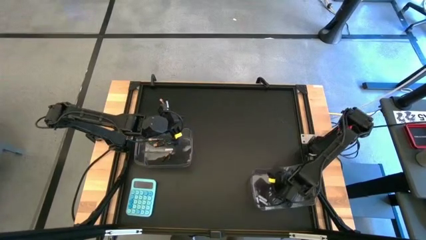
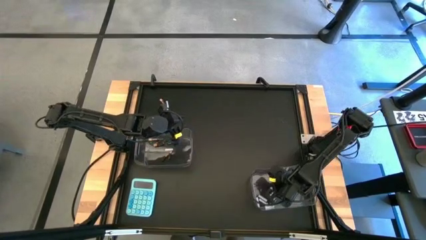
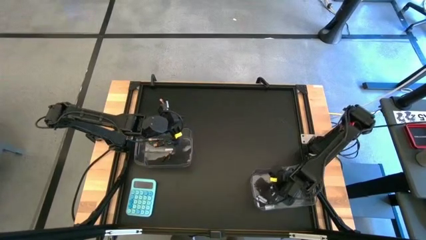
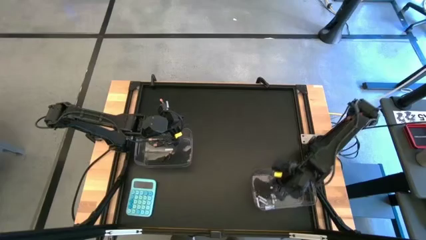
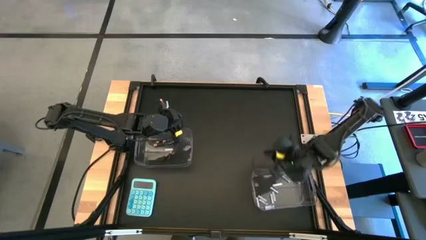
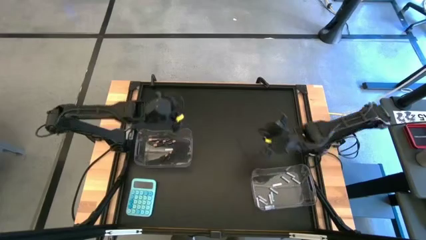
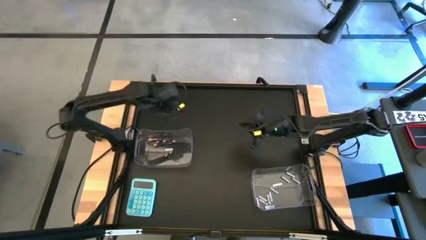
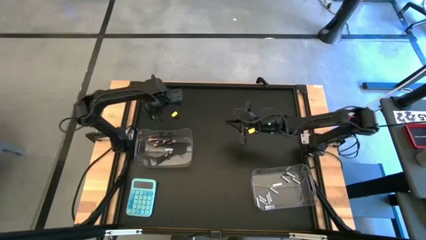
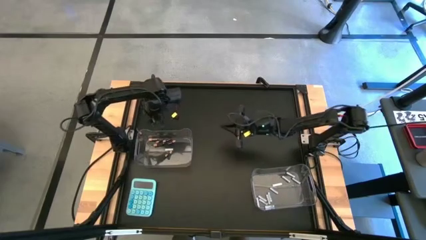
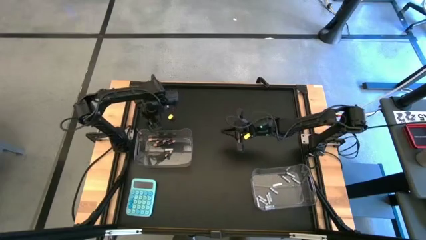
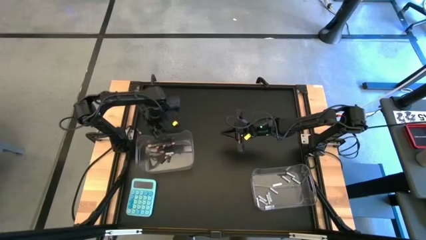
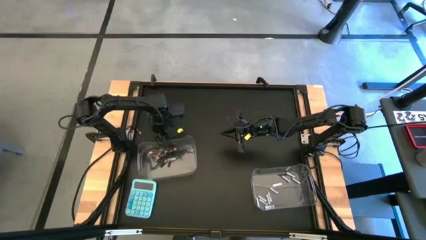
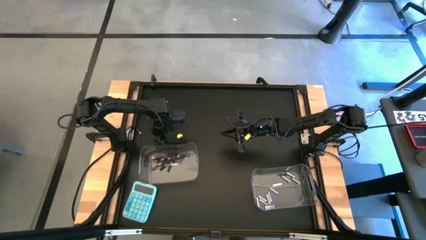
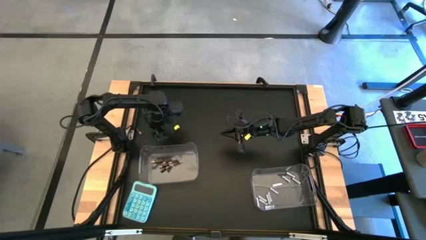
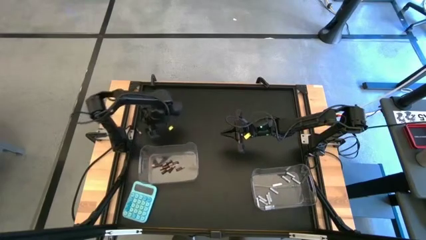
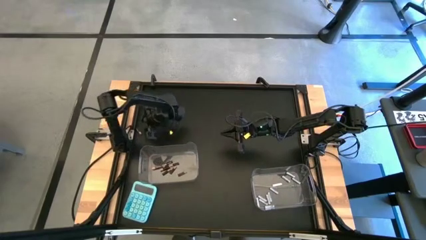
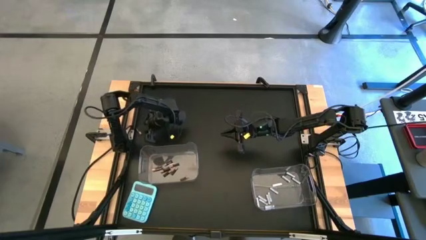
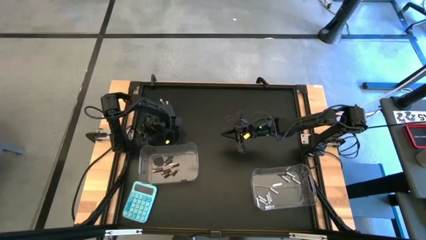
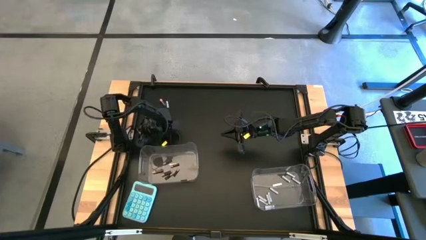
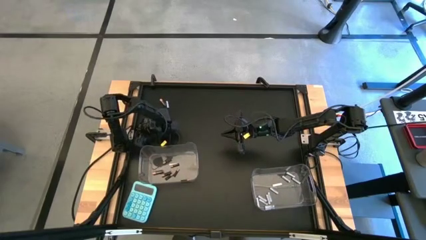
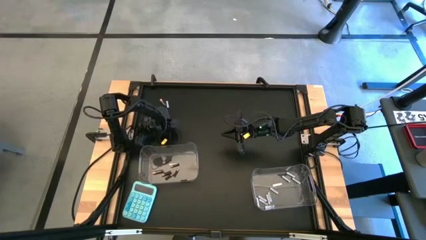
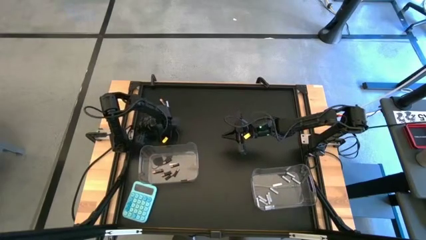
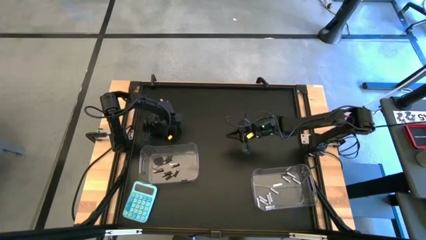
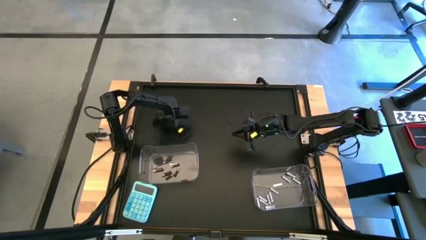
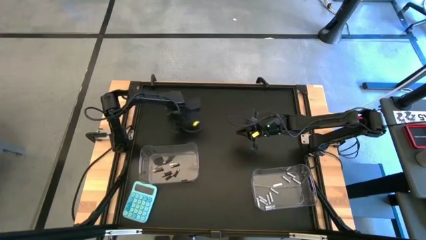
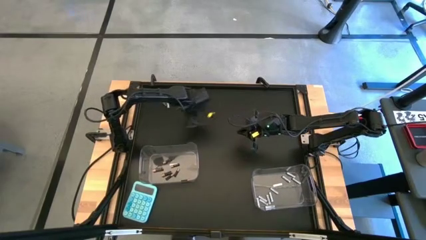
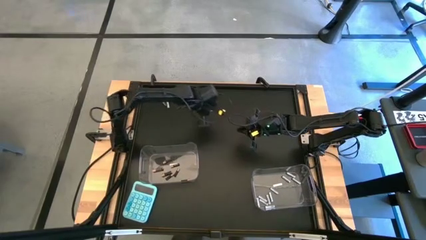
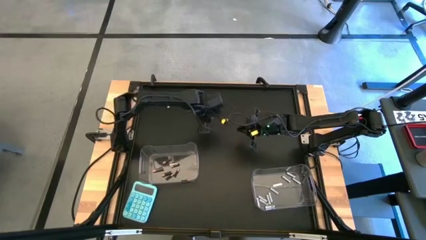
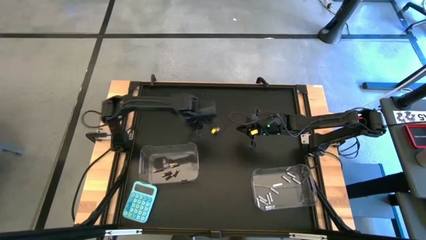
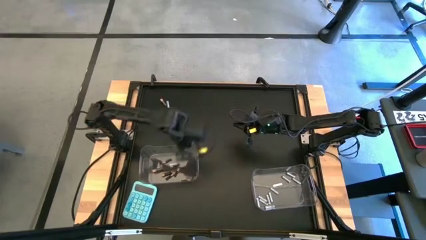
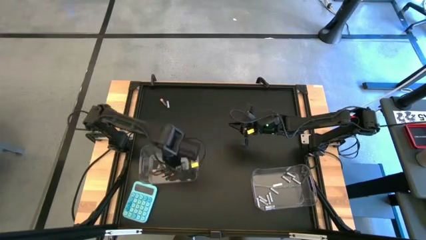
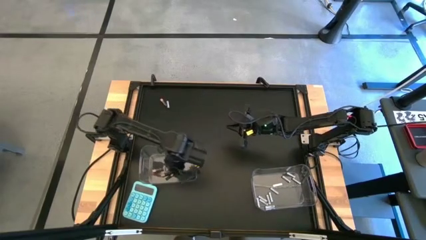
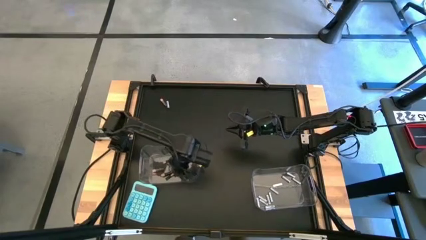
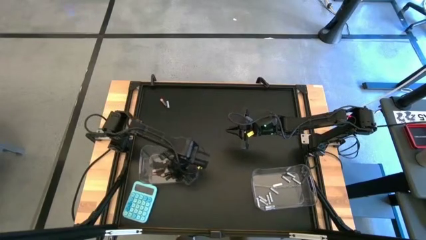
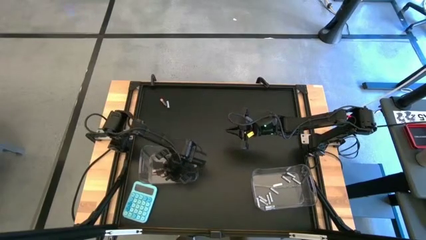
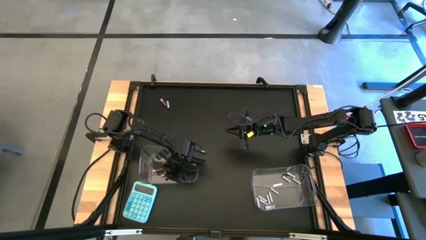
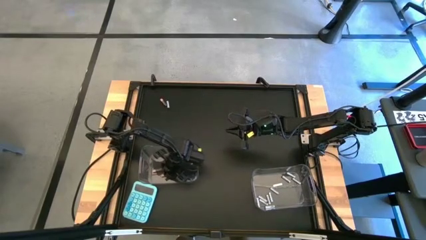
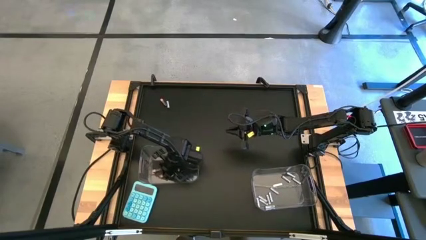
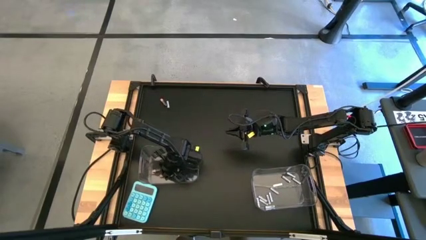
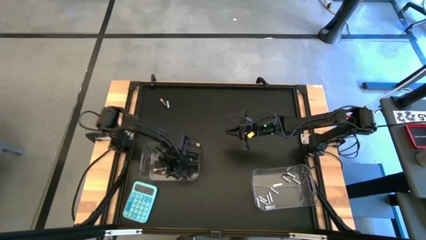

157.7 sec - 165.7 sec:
Task: Sort batteries
Put the black battery into the left transparent bin

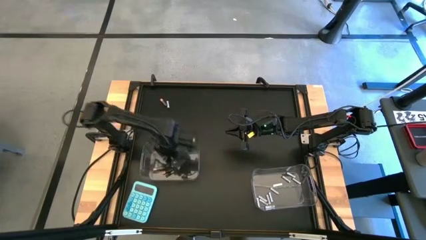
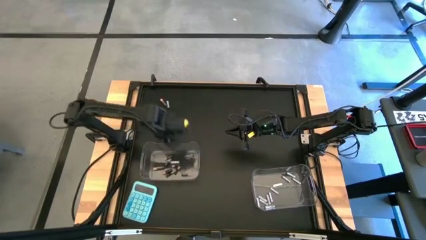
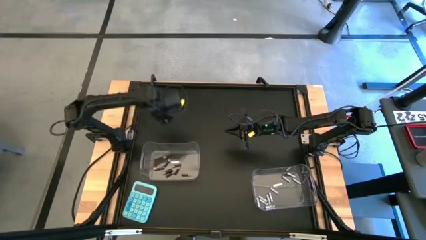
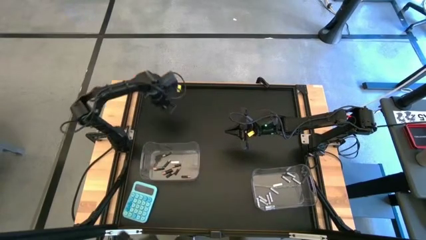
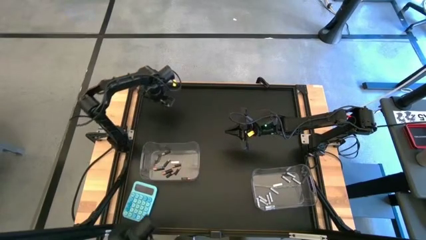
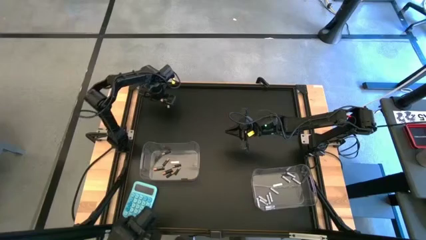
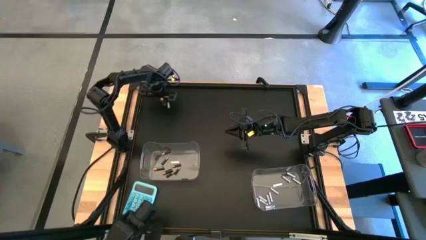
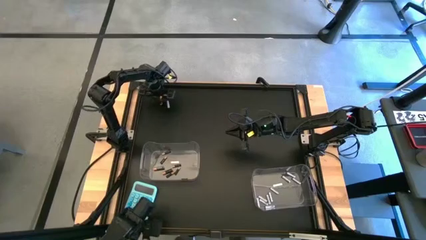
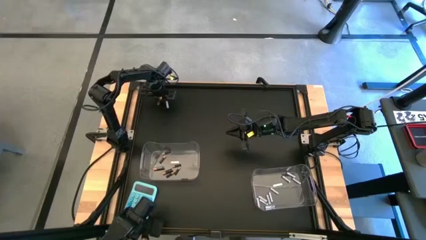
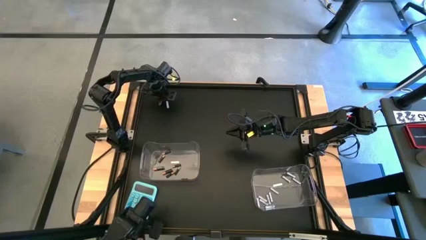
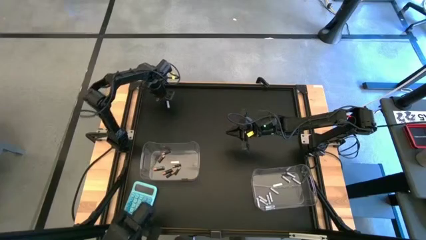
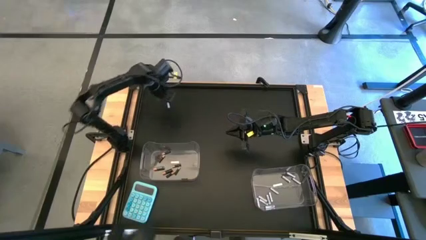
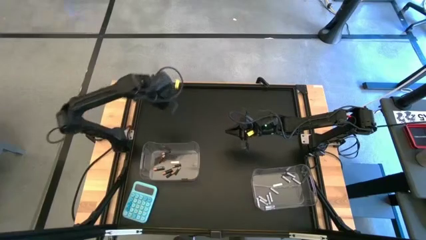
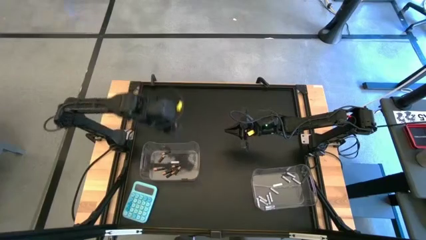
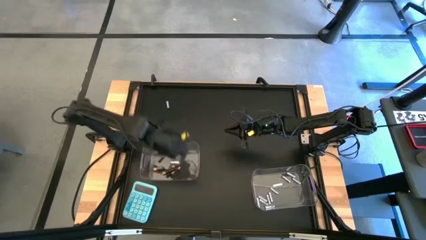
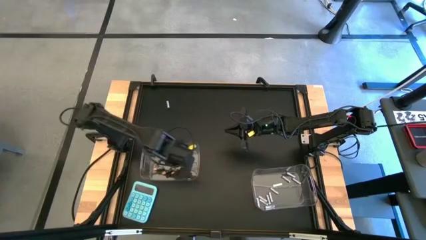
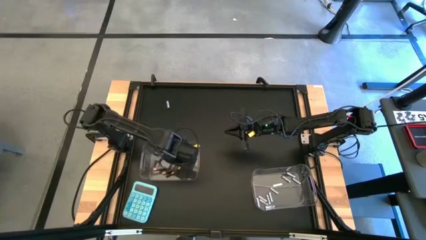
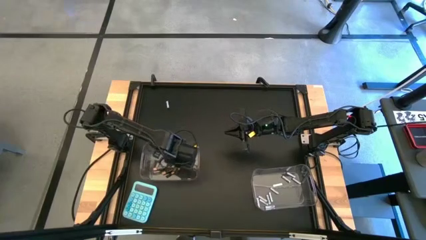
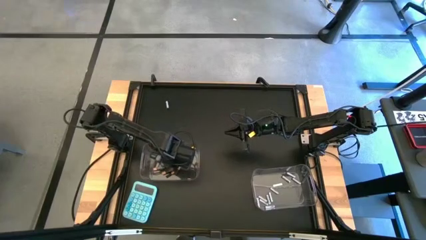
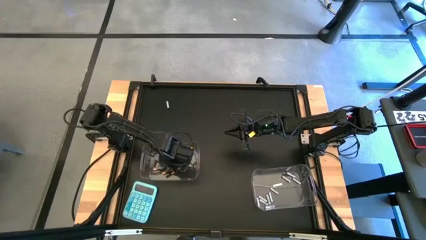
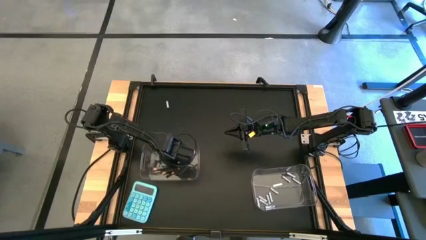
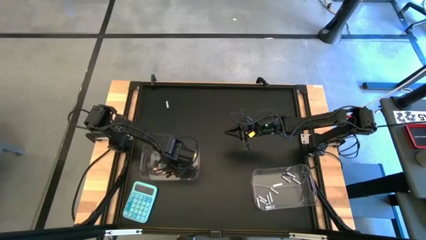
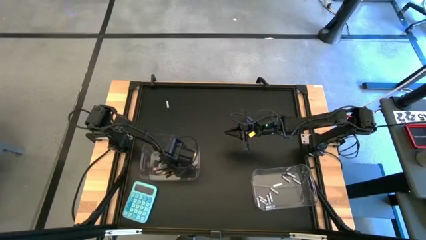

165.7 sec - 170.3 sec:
Put the black battery into the left transparent bin

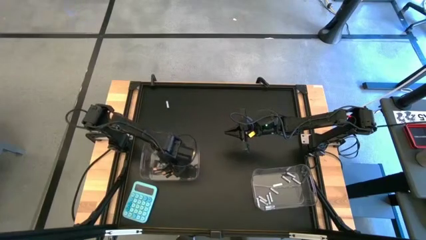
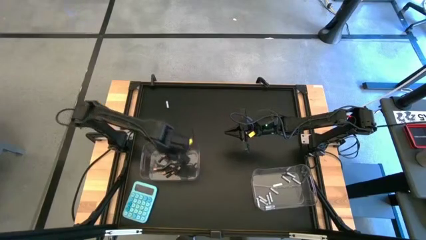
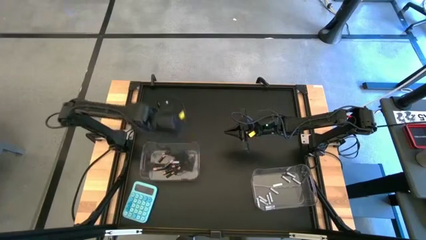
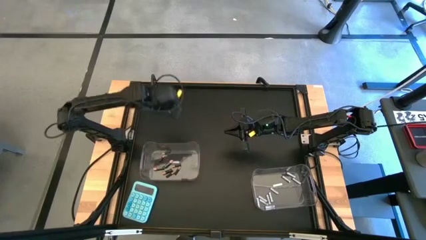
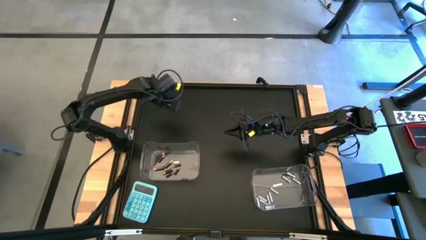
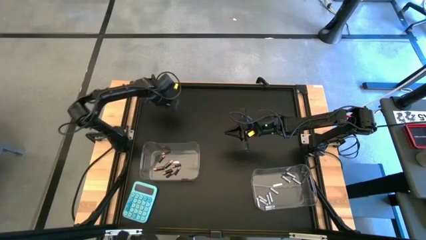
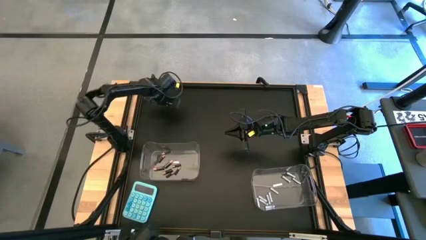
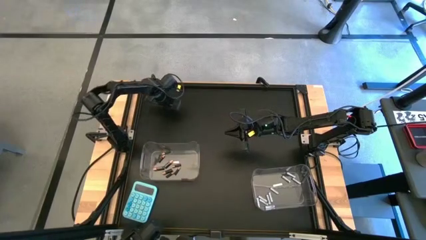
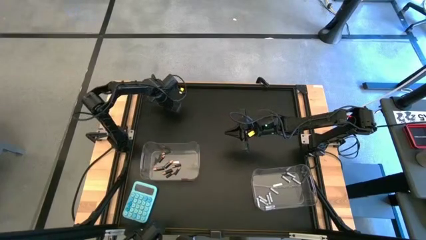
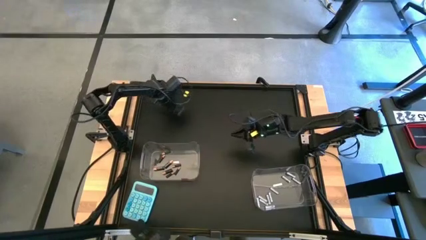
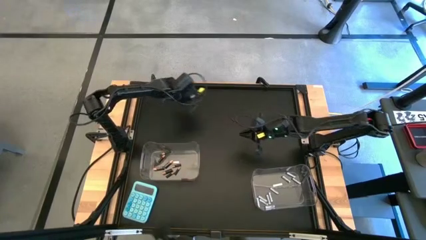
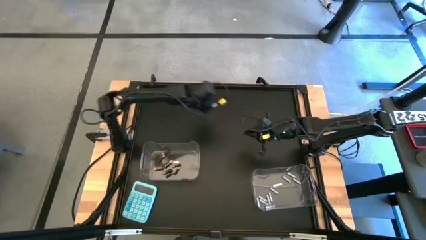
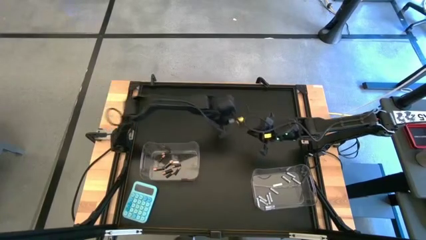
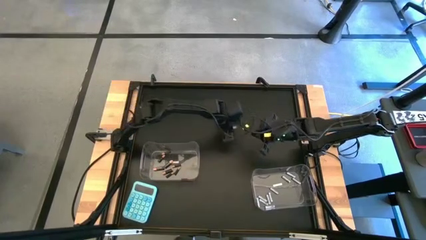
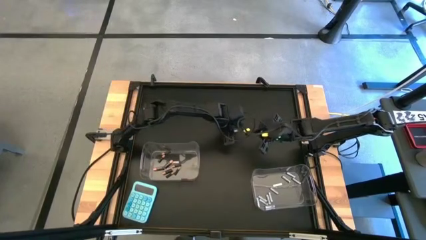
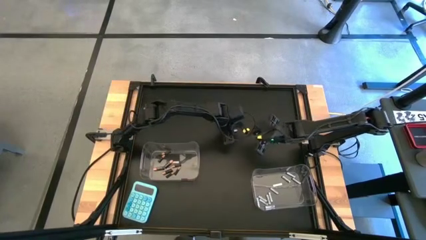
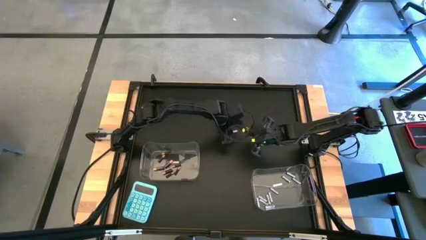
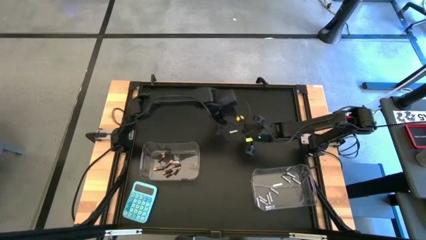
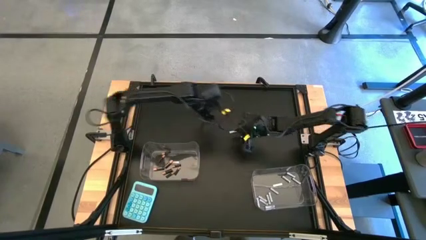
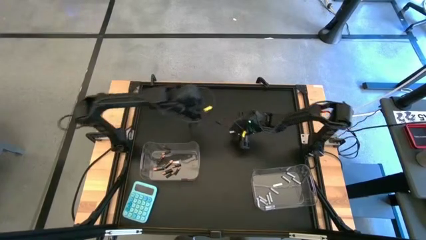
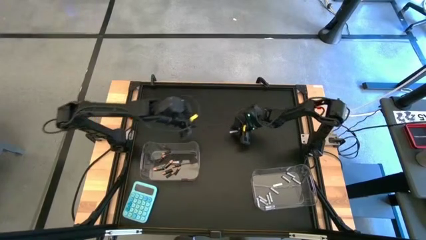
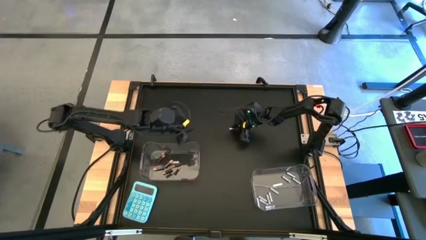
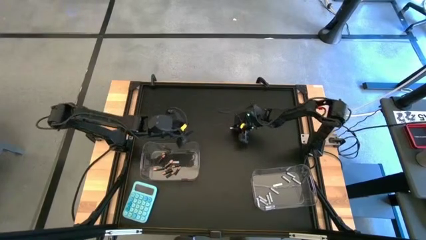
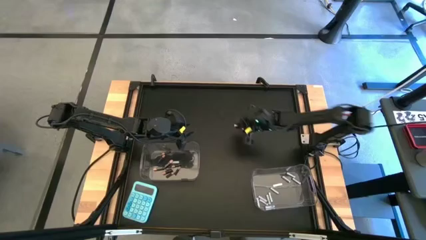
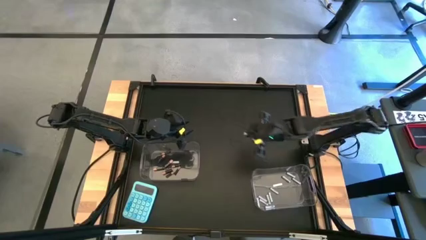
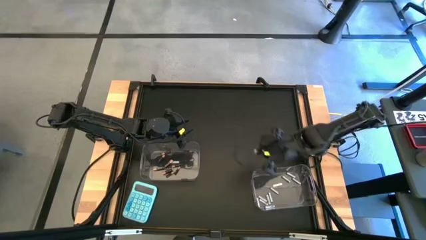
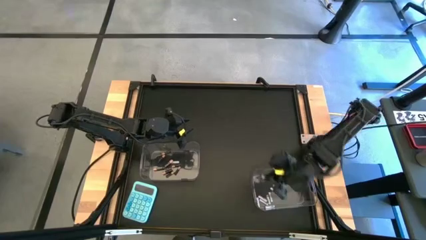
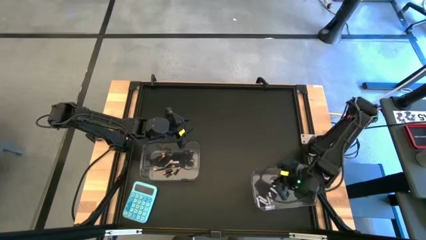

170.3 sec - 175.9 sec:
Put the white battery into the right transparent bin
